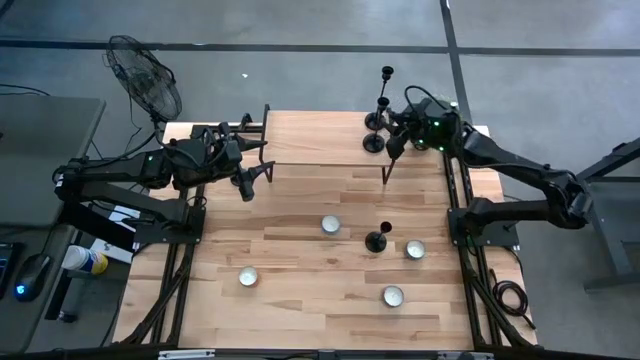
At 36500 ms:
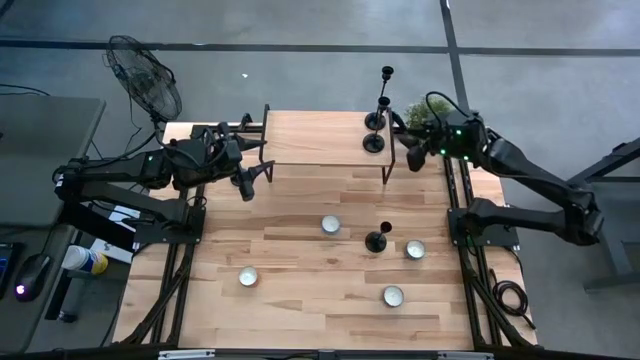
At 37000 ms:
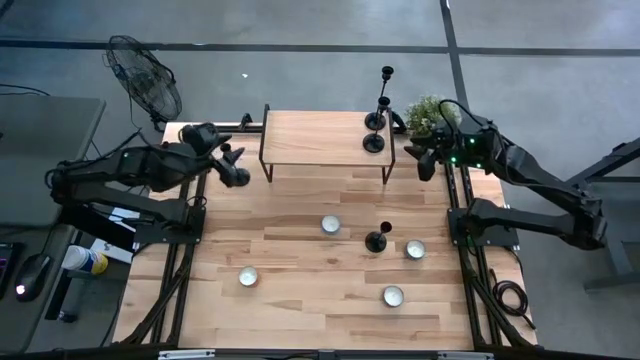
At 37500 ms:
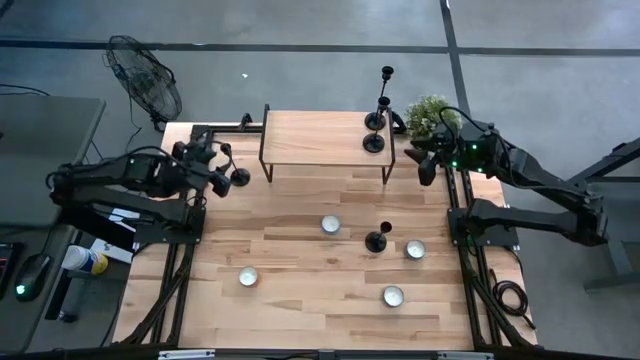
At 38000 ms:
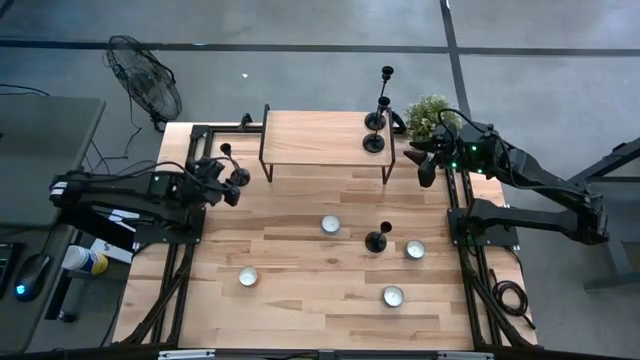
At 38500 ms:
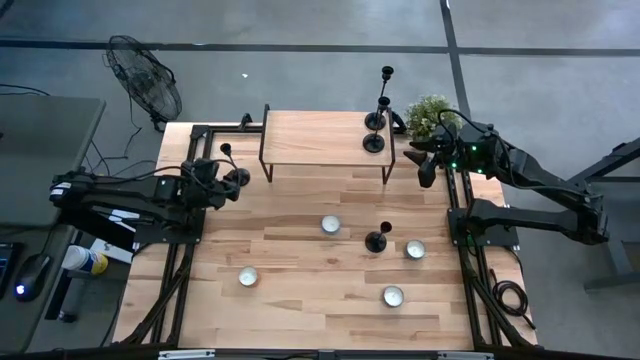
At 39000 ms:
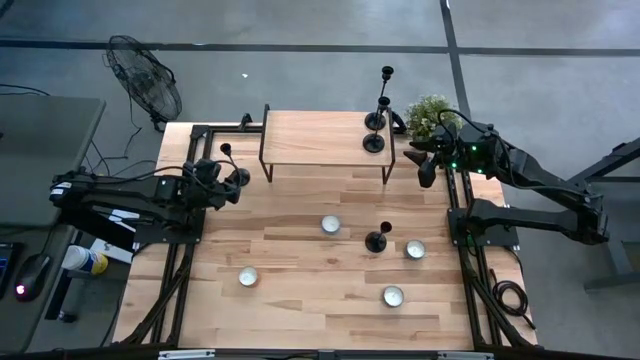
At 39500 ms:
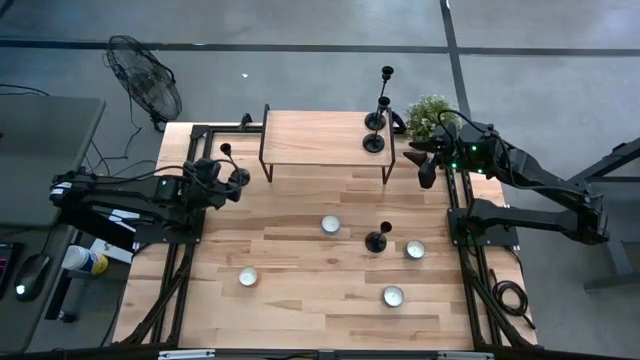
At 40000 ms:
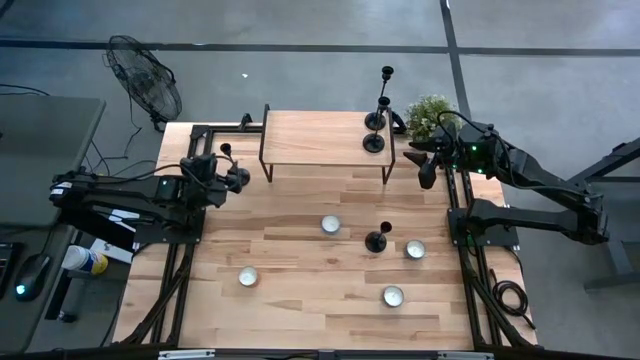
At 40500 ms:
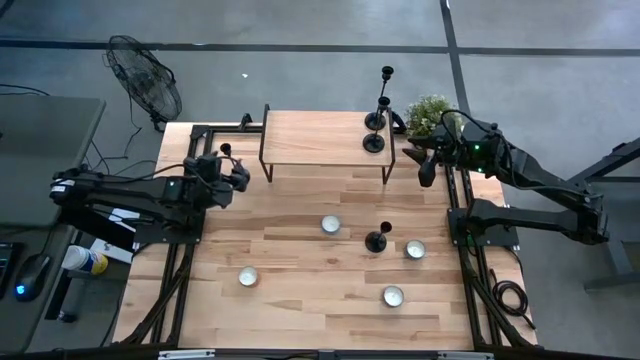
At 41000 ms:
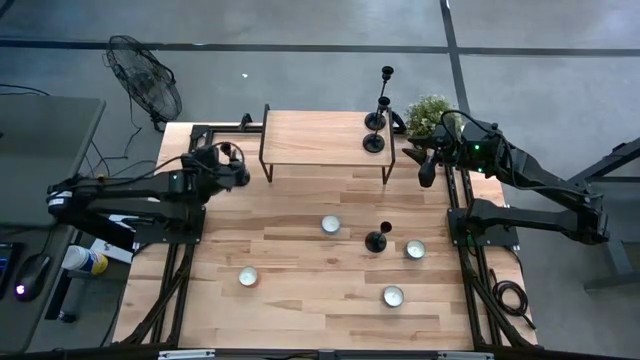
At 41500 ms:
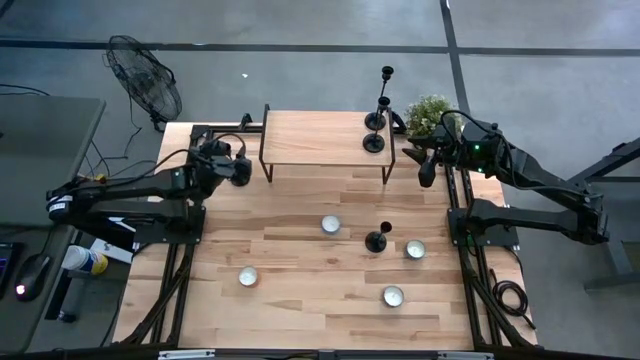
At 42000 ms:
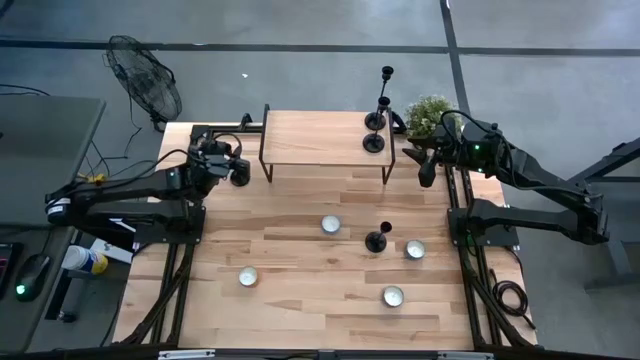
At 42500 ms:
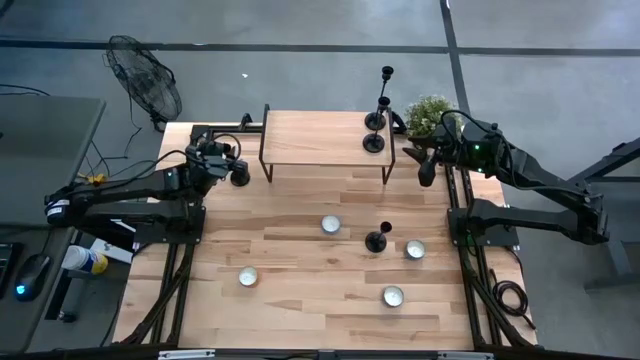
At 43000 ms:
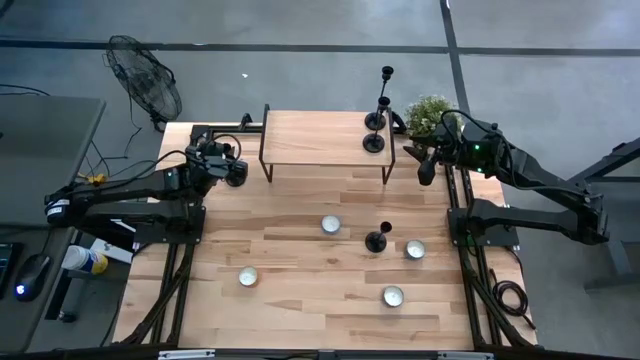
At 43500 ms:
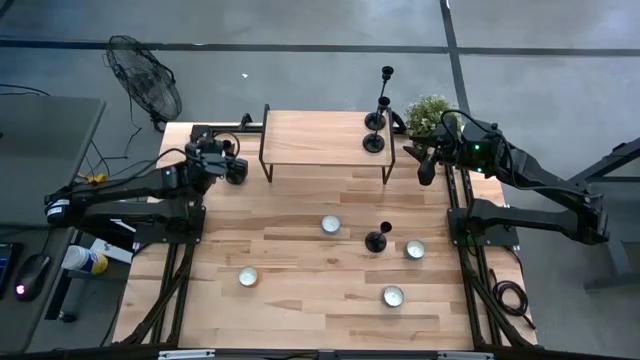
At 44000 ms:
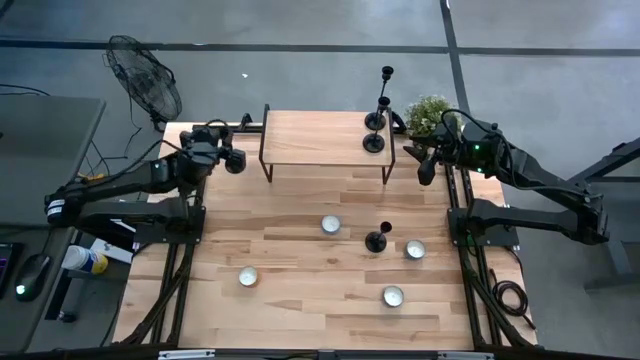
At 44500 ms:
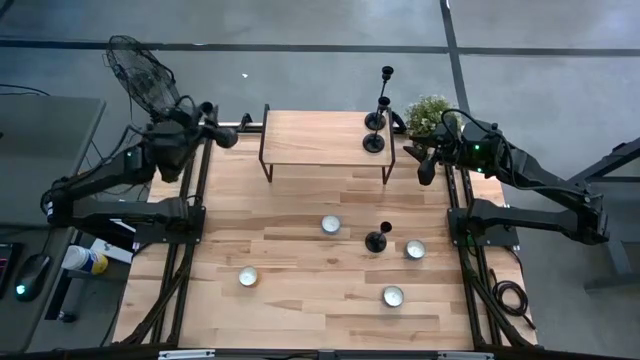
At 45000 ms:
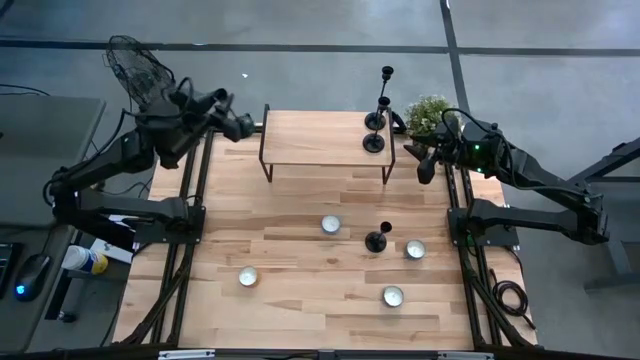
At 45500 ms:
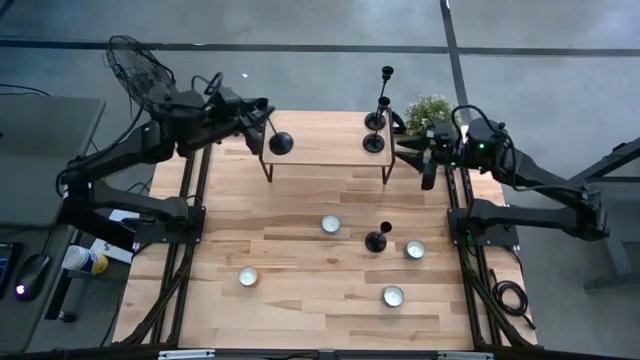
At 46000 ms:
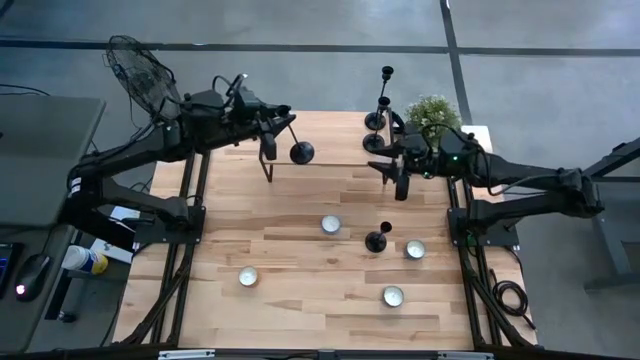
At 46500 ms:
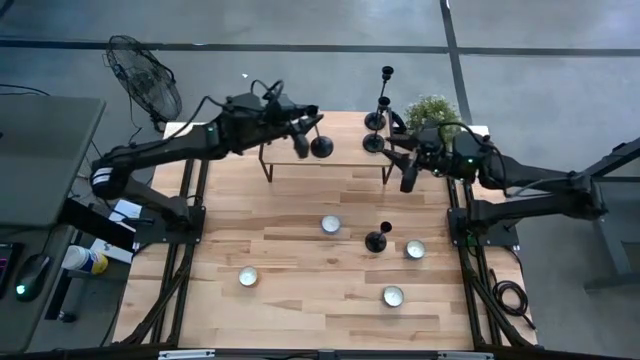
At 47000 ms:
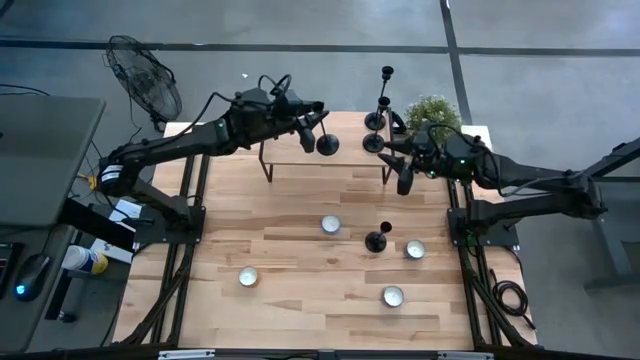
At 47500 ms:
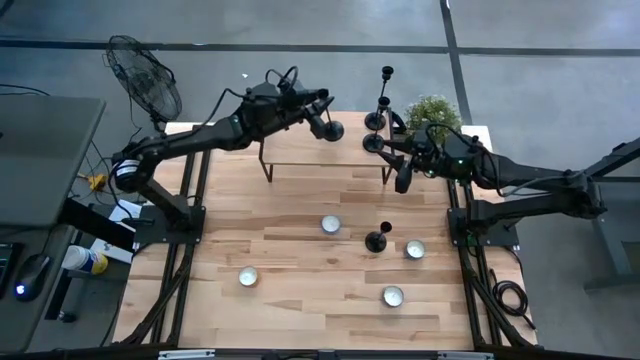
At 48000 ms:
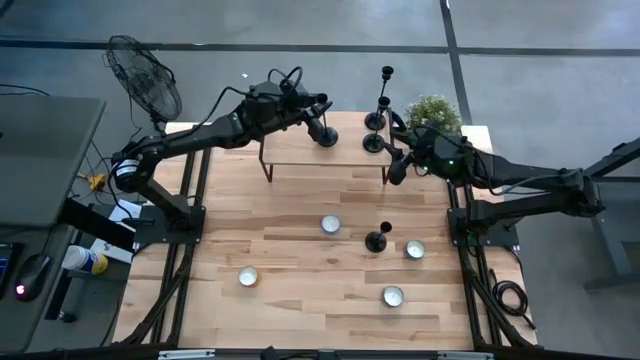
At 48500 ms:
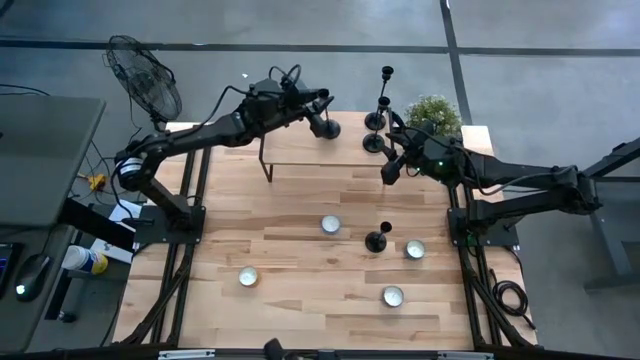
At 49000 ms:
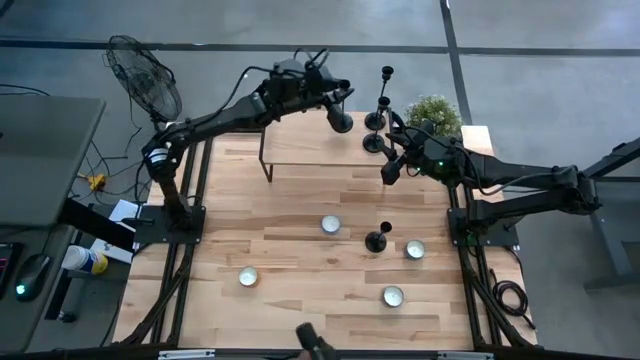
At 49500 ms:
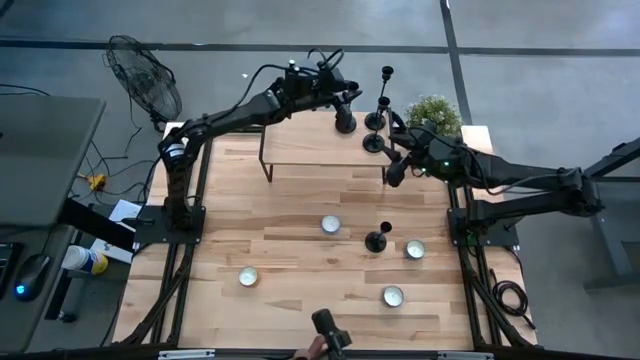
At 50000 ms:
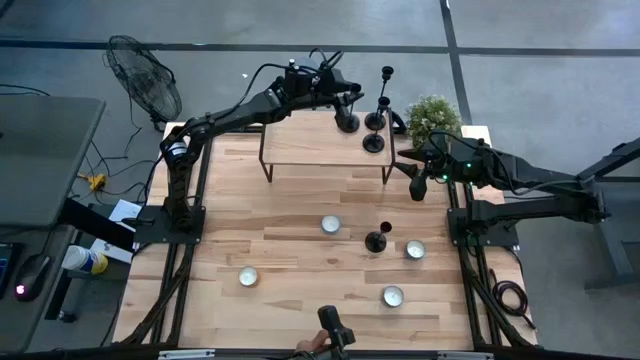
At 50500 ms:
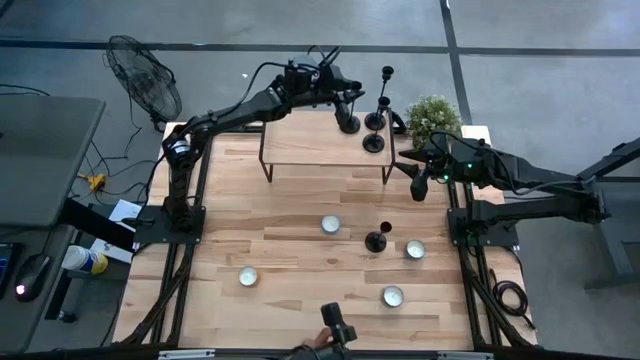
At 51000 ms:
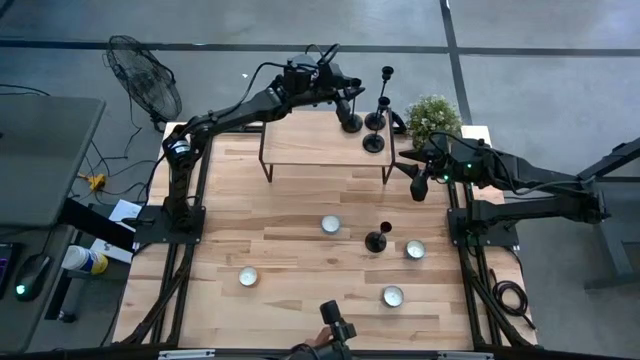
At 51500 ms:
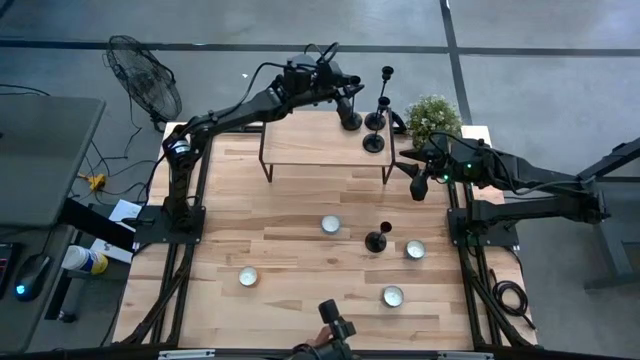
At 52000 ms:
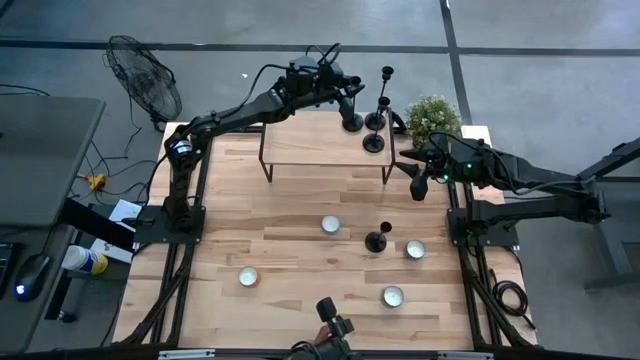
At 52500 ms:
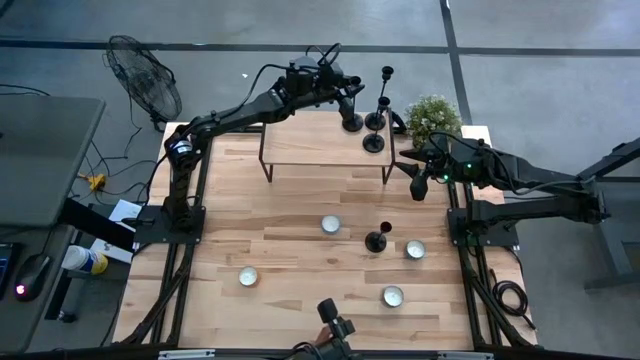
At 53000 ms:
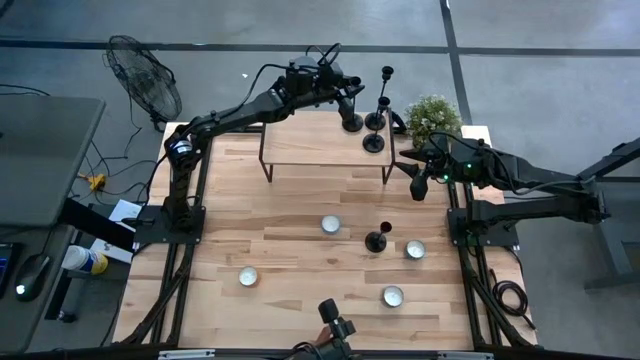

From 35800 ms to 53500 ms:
Task: Pick & Place candle stick holders
Put the black candle holder on the shelf

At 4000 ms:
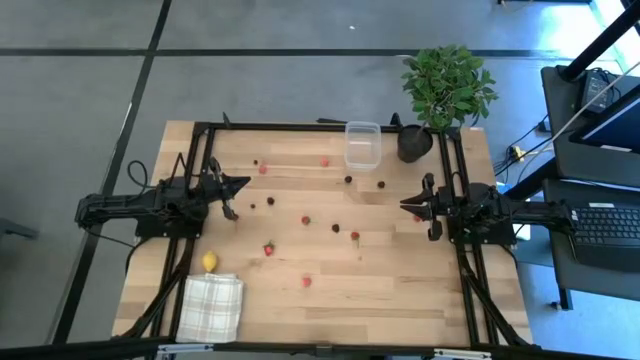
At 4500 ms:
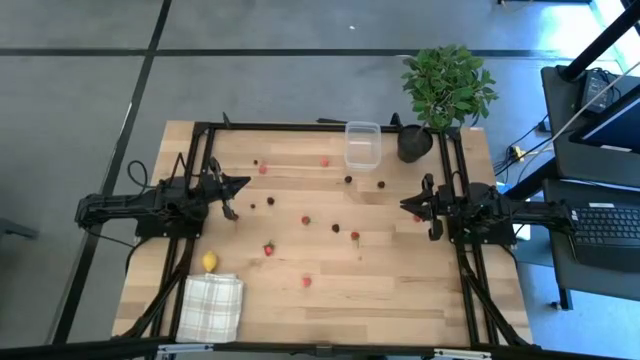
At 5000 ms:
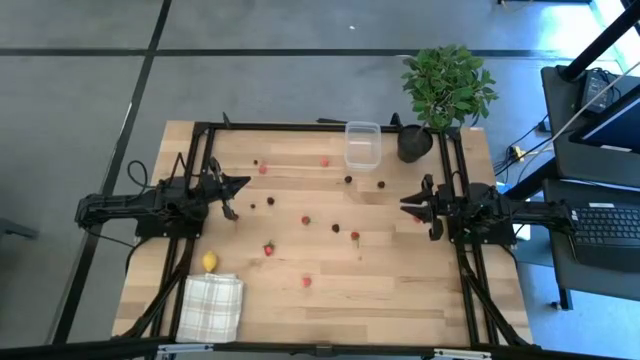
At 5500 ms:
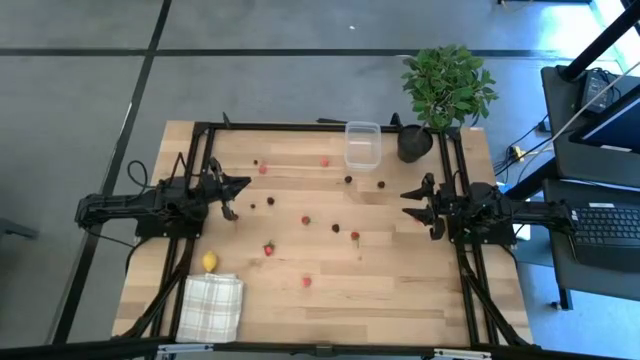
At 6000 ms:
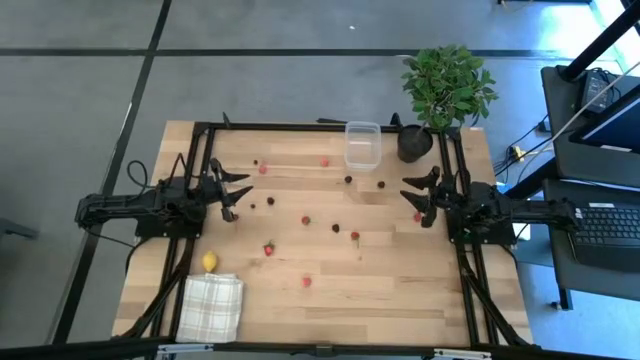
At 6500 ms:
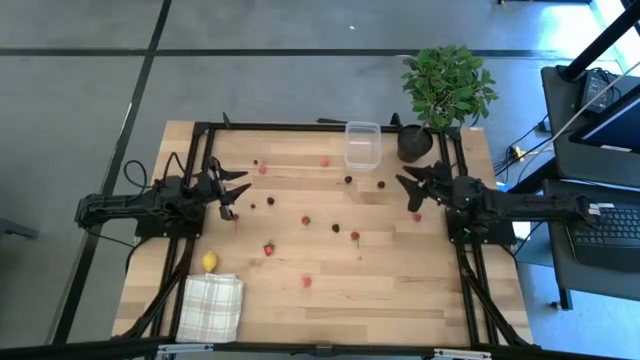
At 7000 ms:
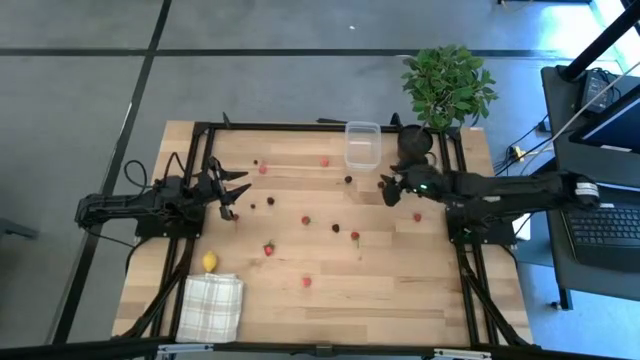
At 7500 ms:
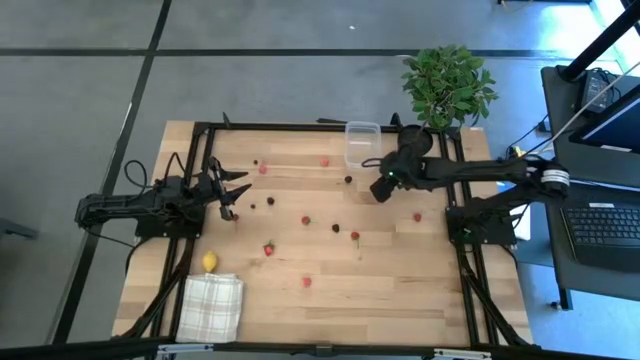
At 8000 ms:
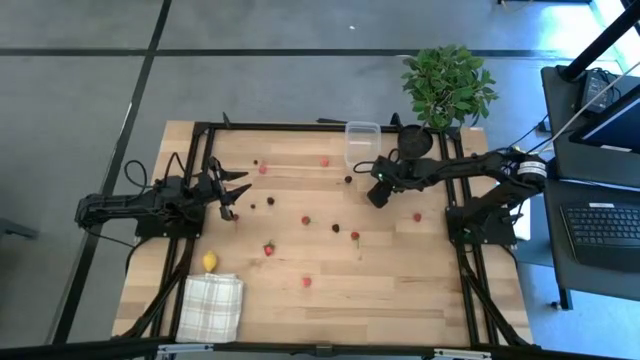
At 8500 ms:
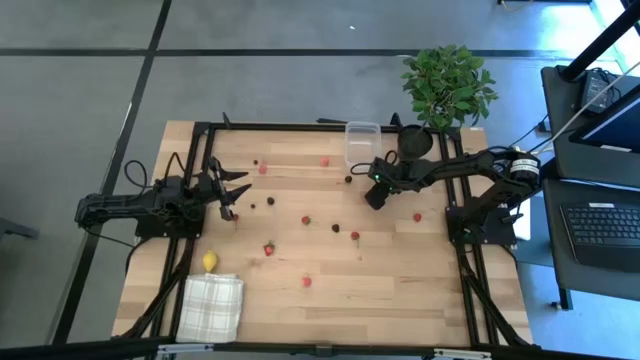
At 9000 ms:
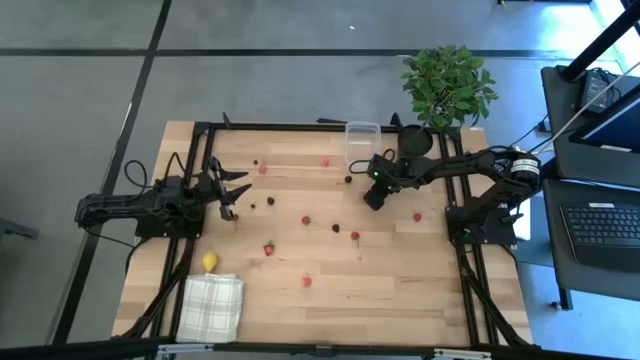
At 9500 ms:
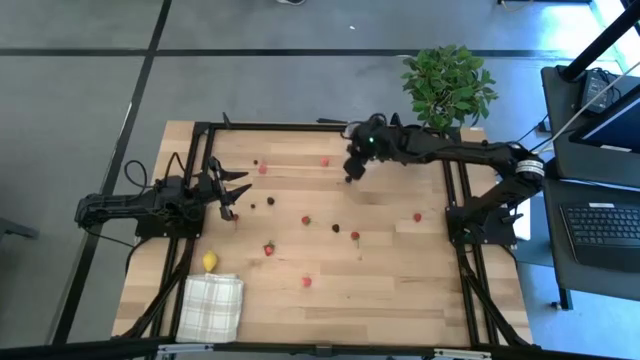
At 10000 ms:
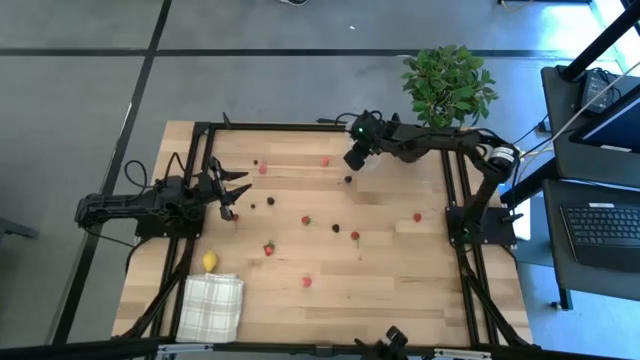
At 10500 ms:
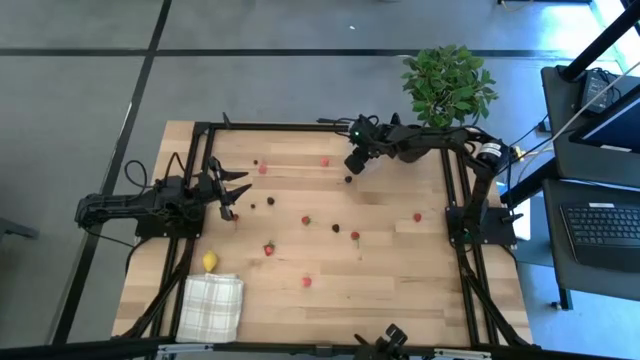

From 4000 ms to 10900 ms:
Task: Pick and placing Produce into tupperware
Put the right black cherry into the transparent bin
